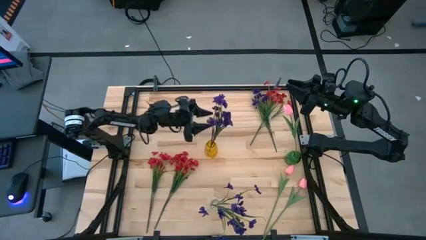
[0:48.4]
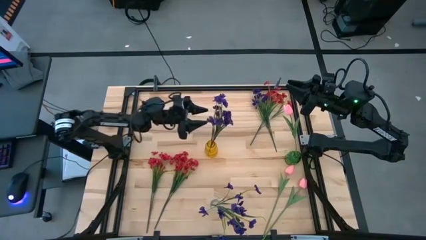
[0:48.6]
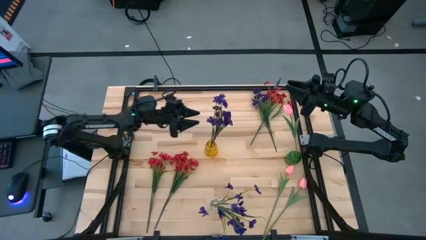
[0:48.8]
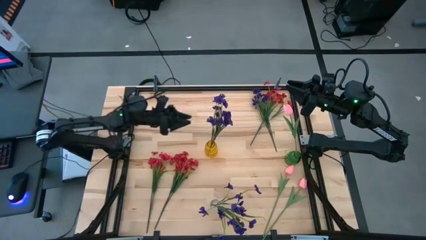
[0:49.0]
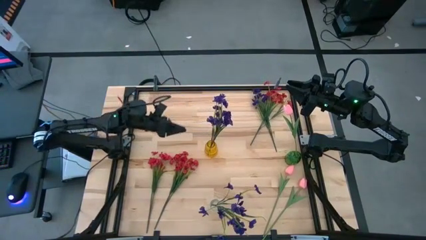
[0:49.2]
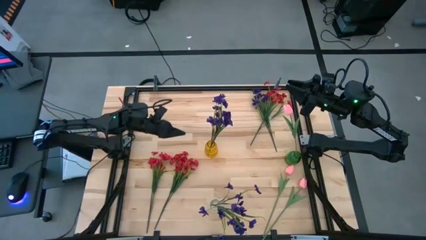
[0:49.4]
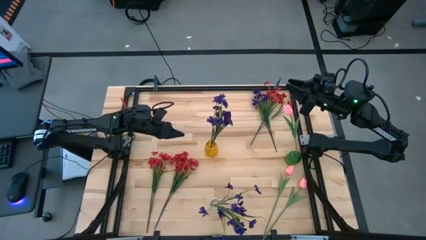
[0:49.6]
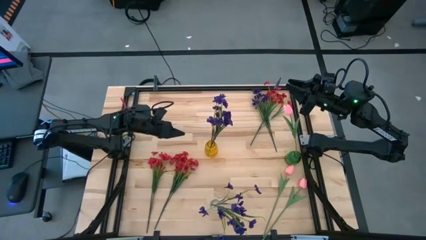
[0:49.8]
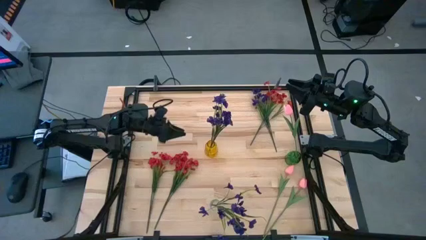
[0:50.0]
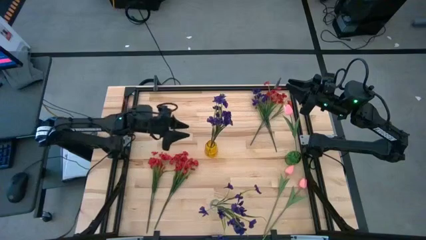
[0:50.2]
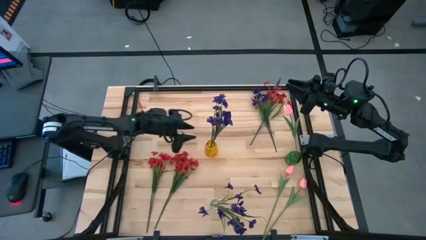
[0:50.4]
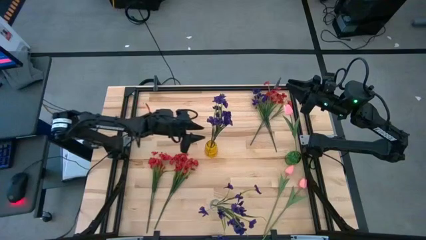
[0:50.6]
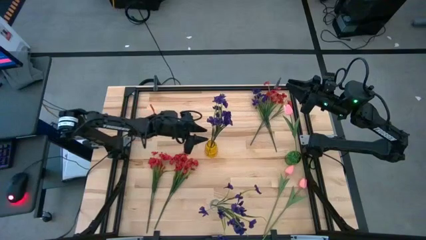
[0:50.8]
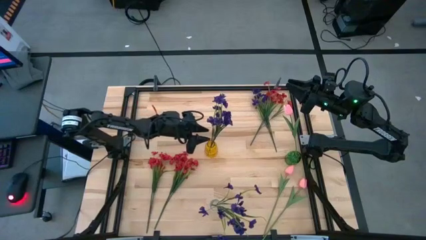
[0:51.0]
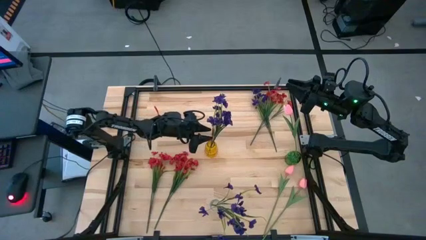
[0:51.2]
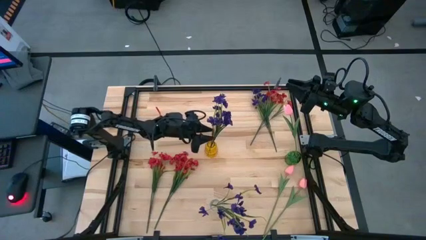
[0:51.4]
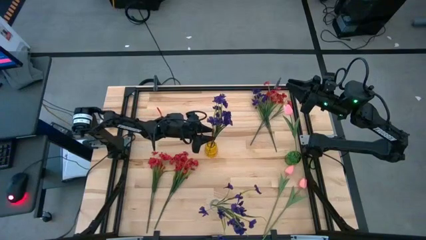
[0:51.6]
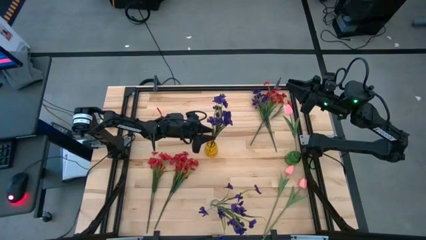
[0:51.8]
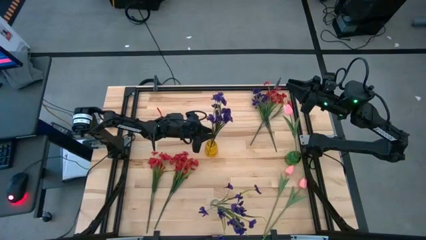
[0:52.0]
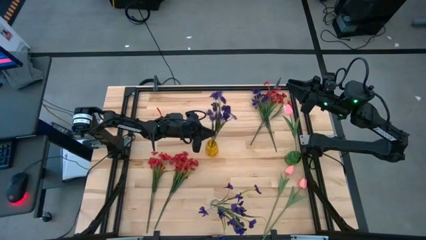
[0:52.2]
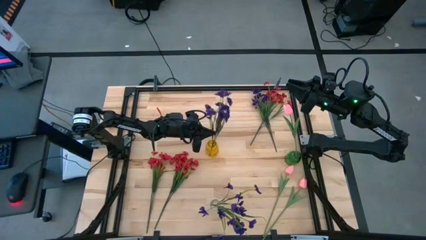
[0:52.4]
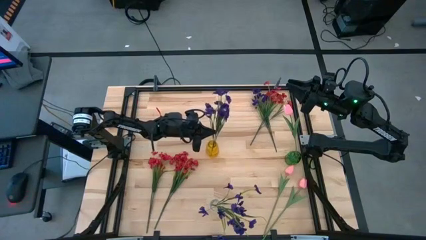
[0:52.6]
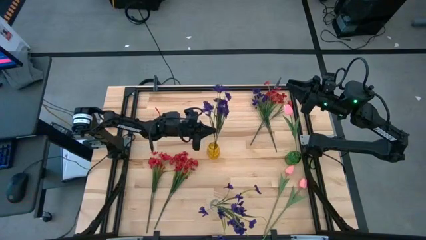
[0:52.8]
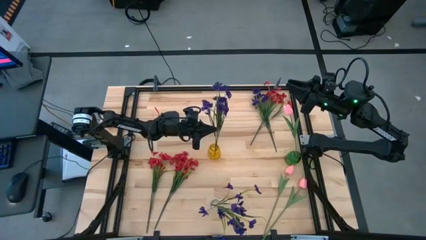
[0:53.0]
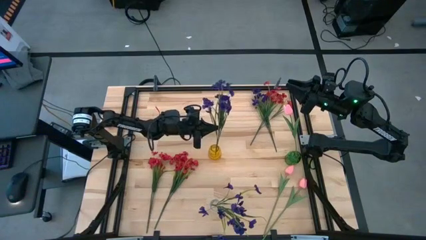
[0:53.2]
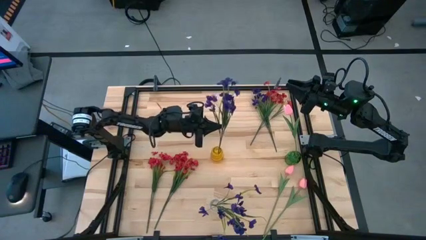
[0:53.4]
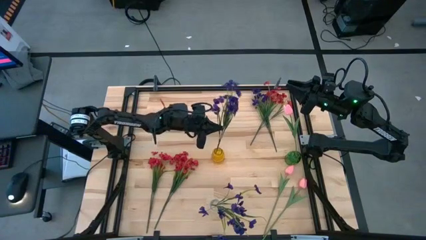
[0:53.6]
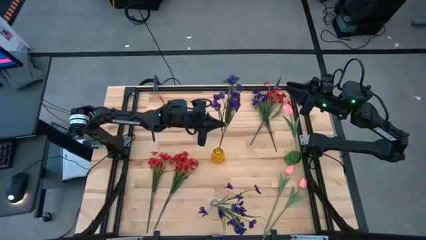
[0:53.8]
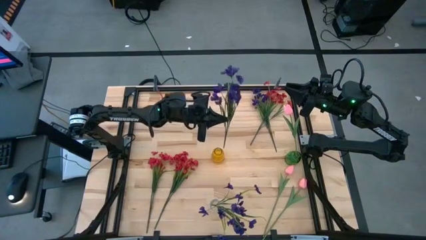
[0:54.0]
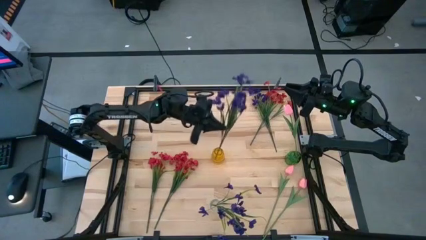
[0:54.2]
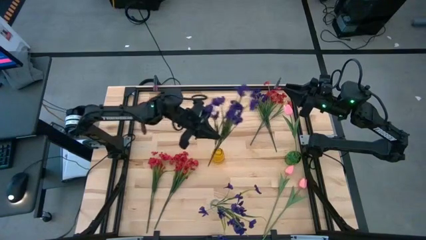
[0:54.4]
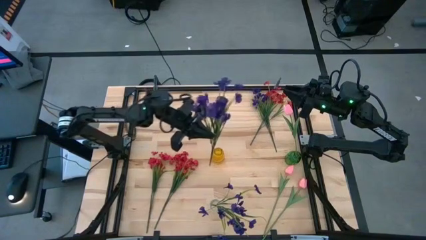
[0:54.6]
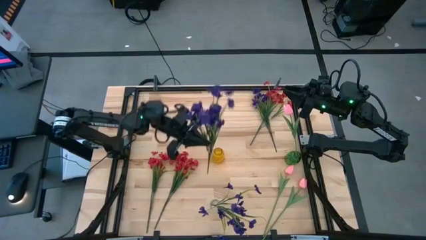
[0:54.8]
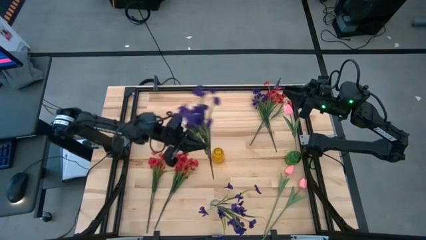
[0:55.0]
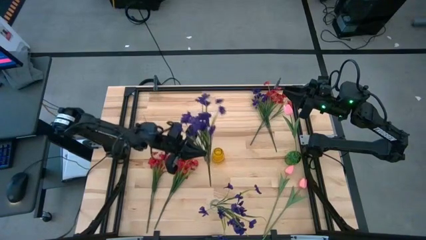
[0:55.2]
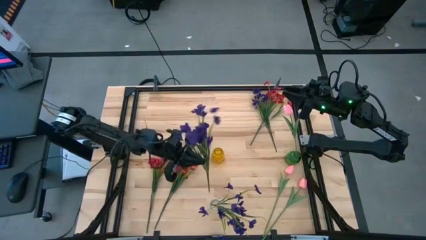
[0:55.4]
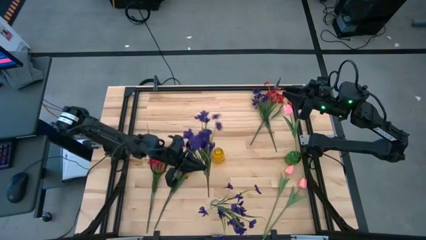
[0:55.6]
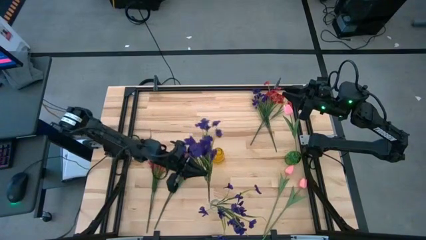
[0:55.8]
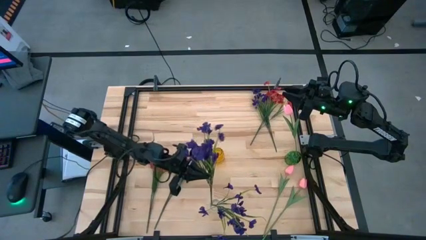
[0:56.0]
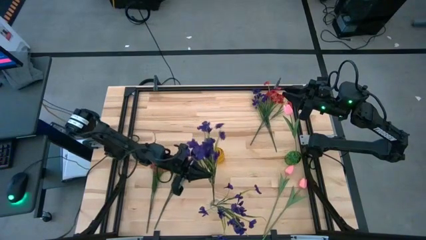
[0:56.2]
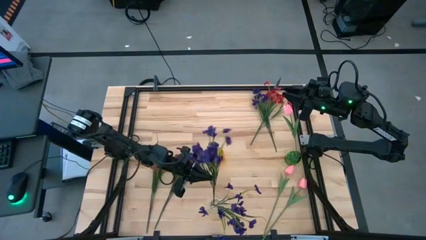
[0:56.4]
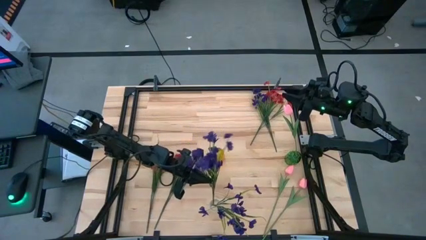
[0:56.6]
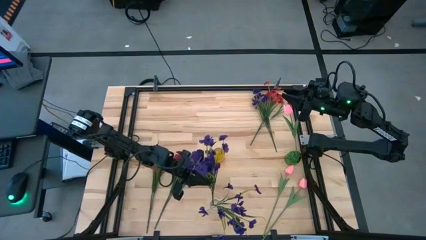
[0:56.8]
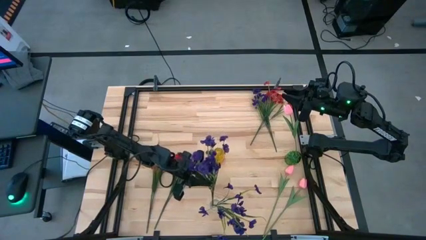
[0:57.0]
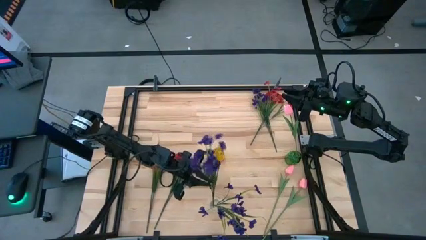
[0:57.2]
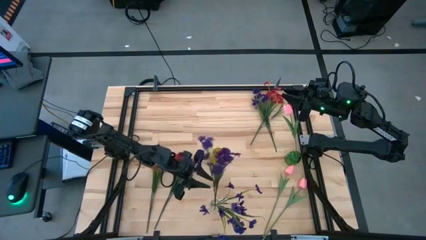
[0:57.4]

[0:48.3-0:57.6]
Task: Sort flowers into vase by color
Move the purple flower from the yellow vase to the transparent vase

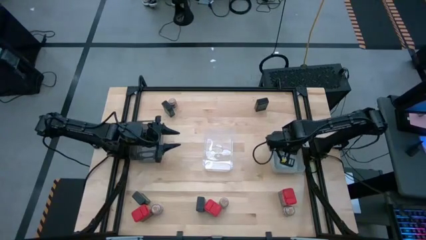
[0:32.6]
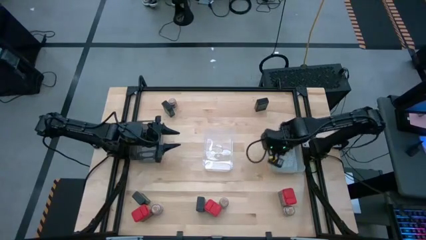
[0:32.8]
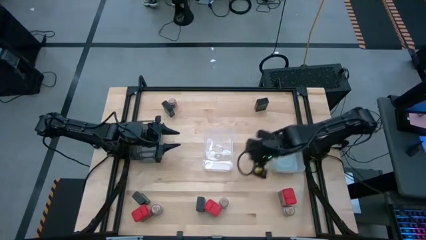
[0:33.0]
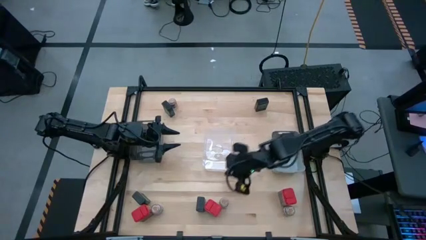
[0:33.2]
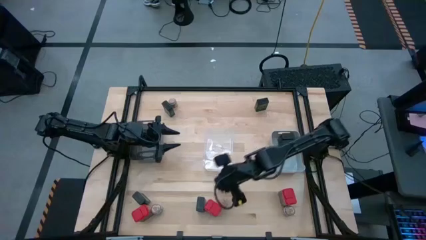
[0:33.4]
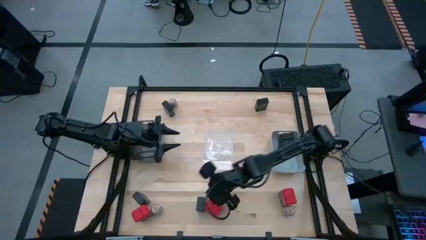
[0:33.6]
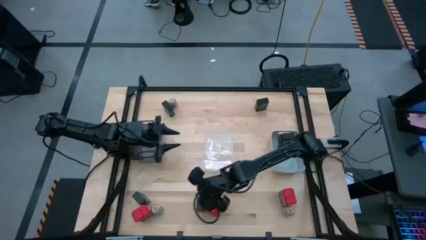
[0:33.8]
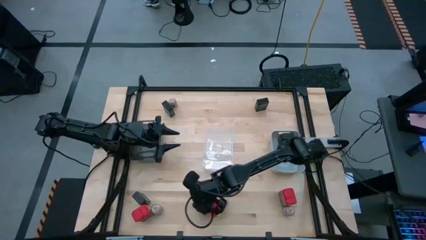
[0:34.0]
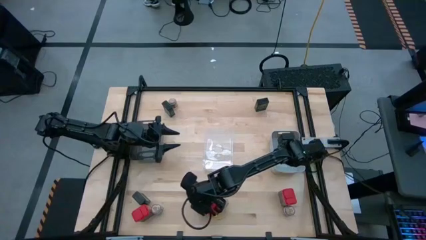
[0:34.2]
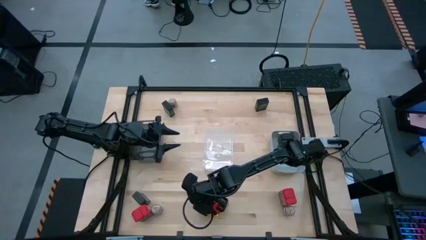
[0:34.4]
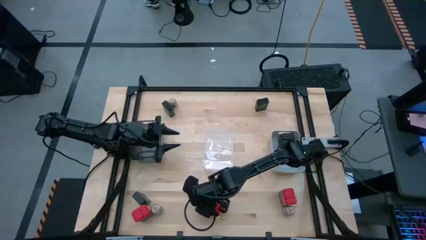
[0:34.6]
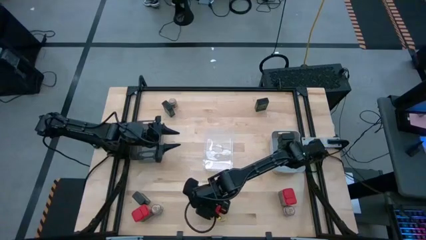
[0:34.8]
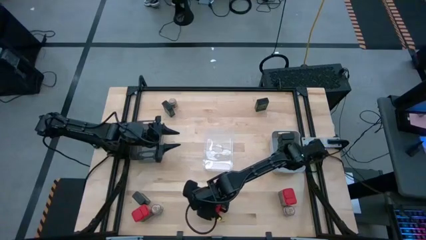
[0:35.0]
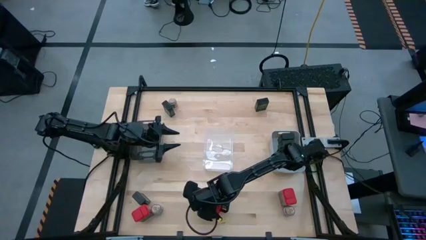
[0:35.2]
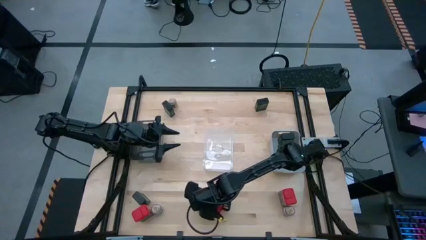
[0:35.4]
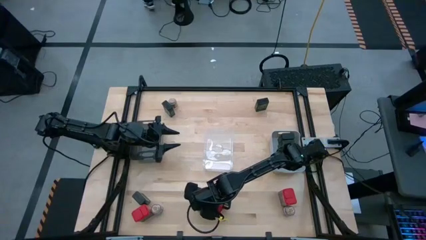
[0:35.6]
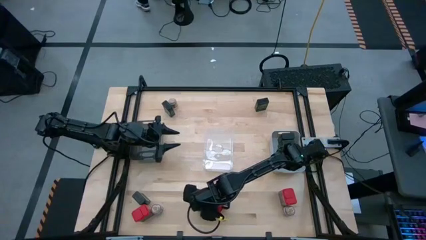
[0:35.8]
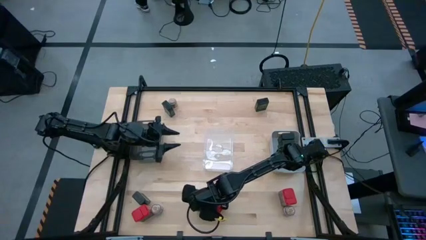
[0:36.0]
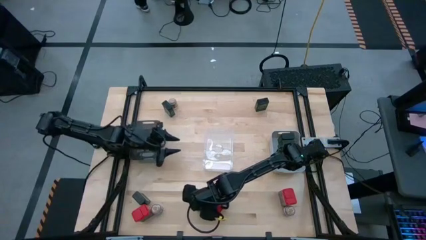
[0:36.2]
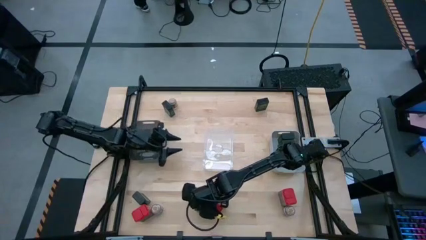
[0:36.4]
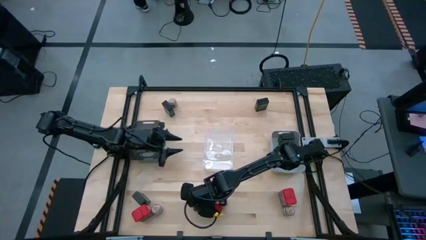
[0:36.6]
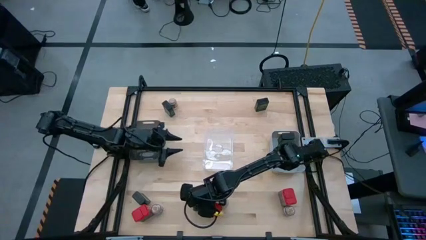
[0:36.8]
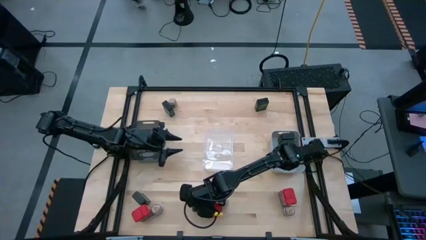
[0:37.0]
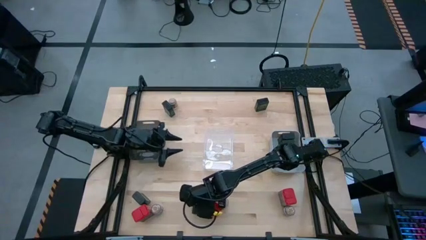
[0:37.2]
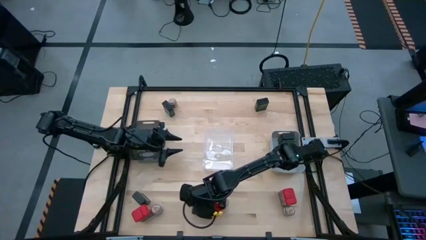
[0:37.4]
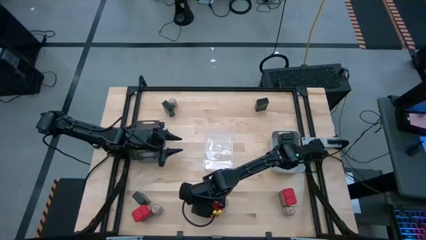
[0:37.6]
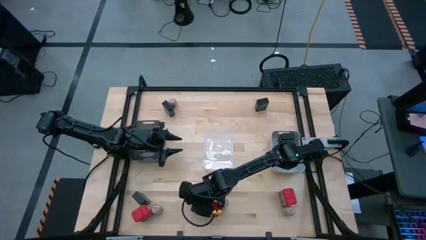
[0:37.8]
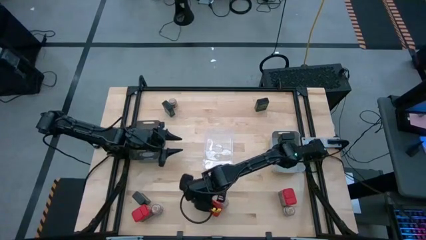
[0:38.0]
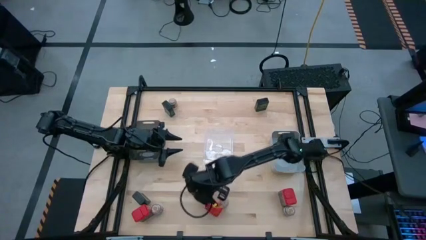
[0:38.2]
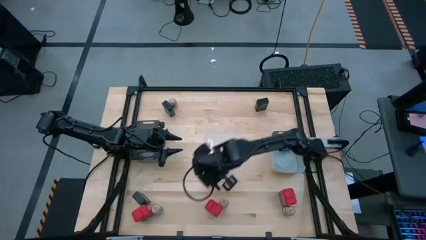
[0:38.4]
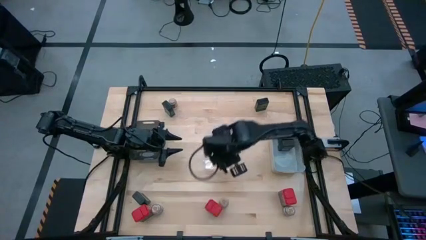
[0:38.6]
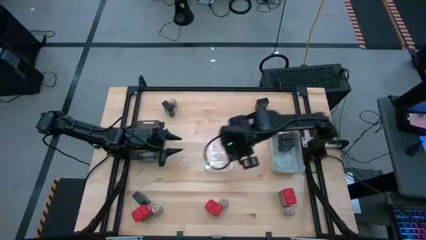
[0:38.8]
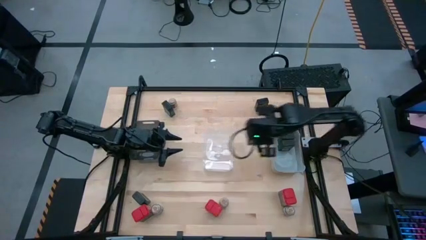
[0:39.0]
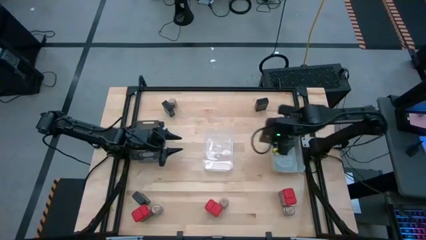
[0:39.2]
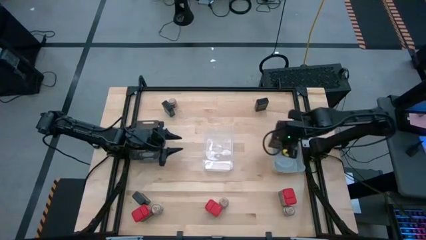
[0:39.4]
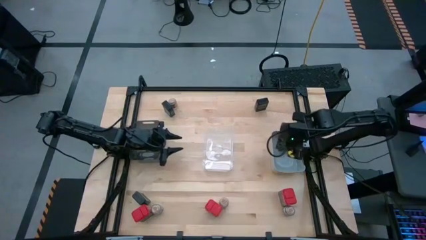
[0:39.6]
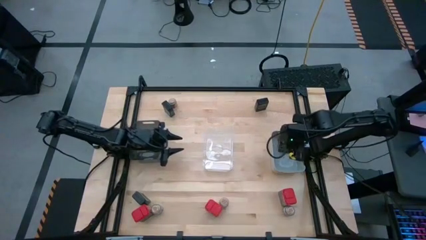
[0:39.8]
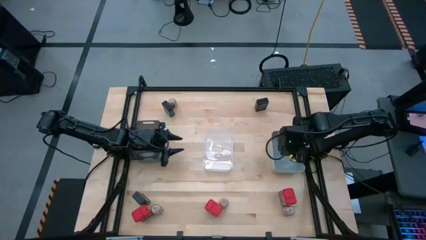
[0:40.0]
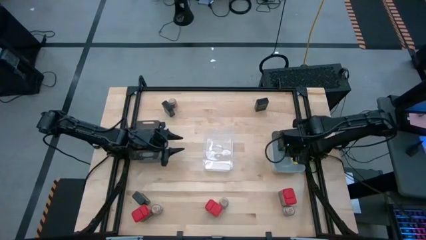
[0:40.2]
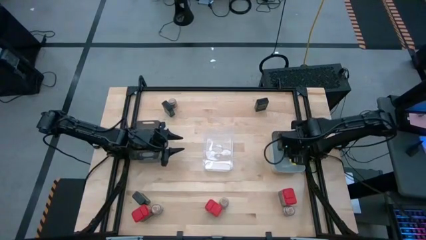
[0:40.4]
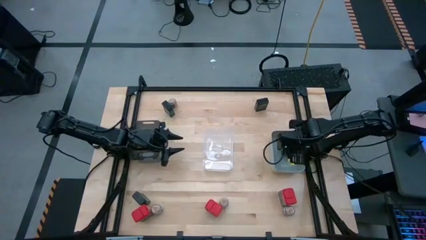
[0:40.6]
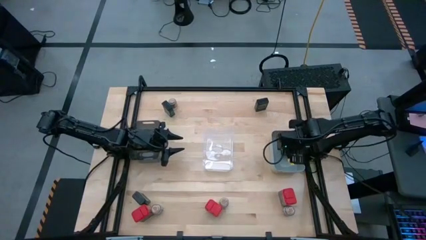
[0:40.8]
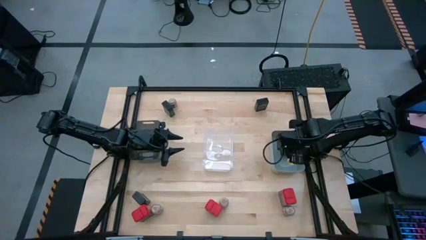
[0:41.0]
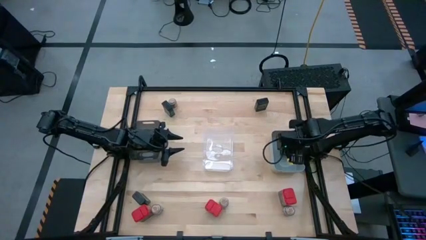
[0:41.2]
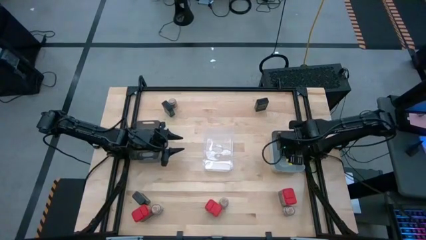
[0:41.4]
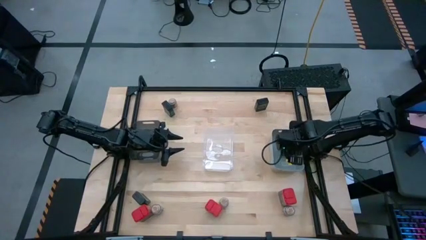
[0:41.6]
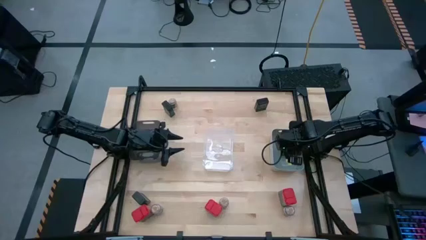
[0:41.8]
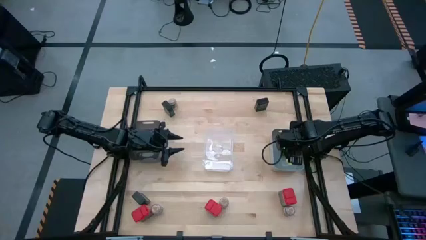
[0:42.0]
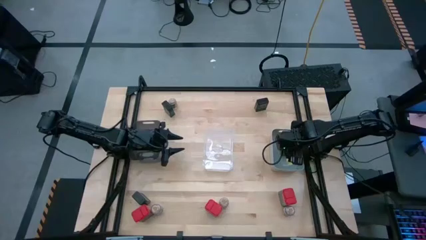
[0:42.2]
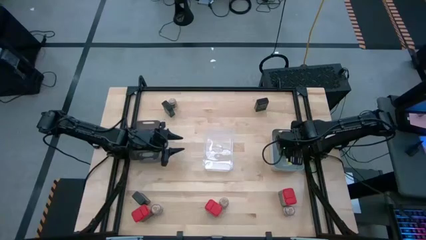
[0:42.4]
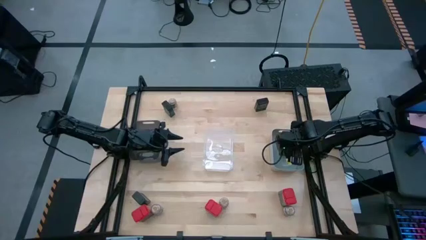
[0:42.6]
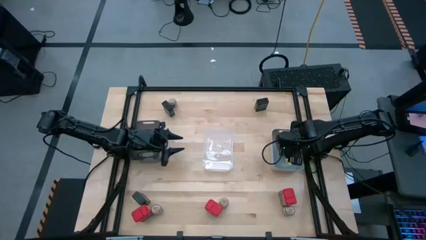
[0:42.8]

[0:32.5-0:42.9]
Task: Sort spices by type
Put the black seasoning can into the gray bin
